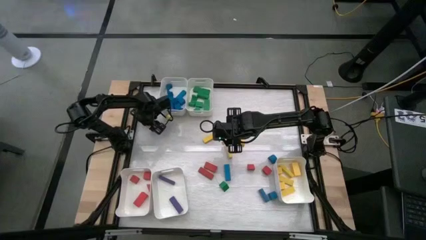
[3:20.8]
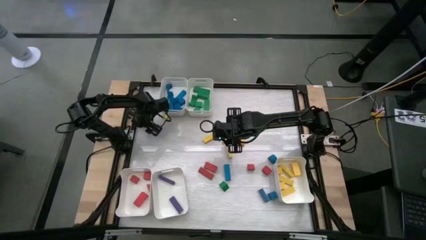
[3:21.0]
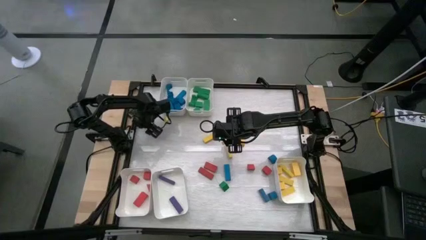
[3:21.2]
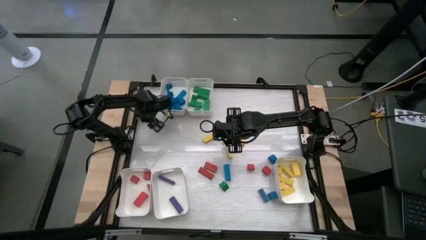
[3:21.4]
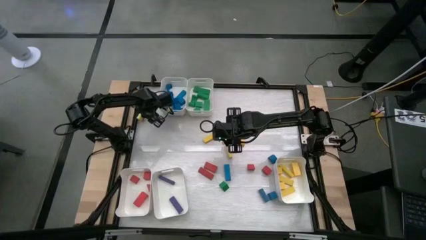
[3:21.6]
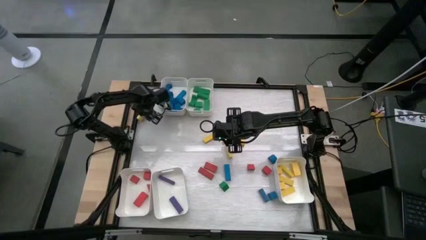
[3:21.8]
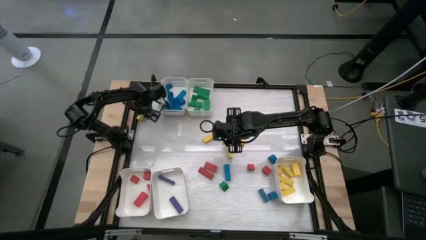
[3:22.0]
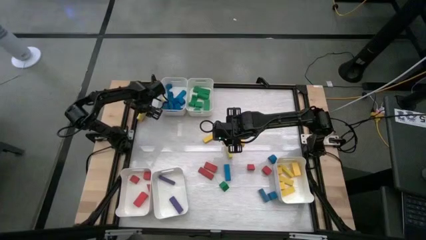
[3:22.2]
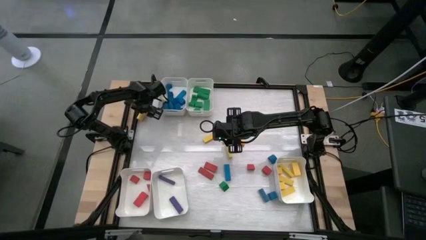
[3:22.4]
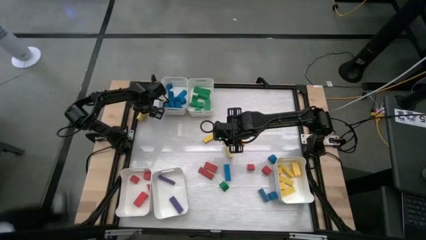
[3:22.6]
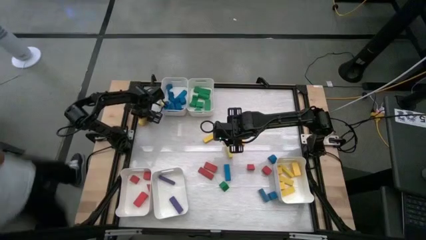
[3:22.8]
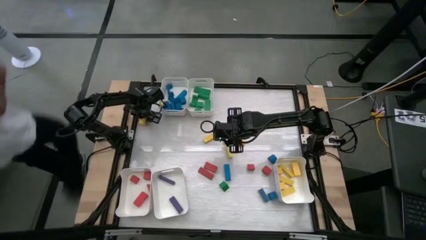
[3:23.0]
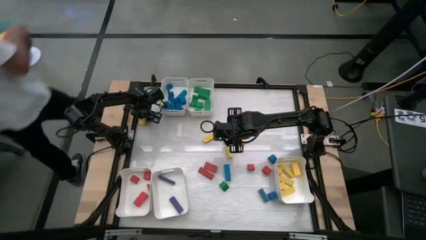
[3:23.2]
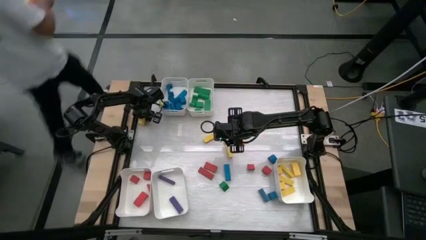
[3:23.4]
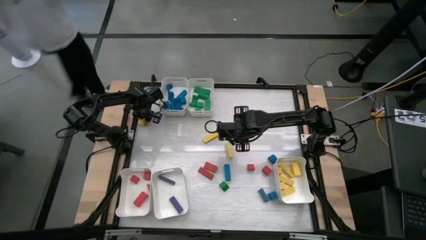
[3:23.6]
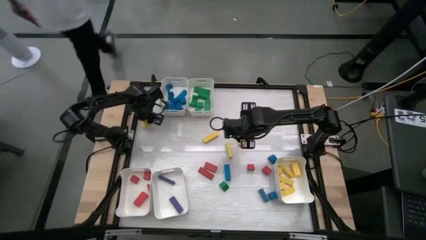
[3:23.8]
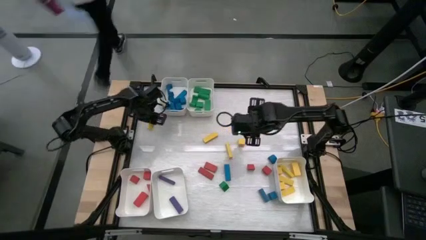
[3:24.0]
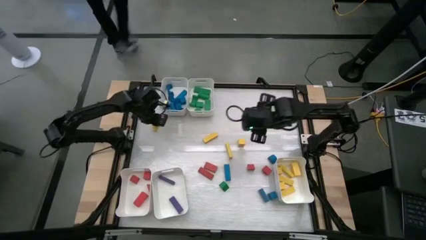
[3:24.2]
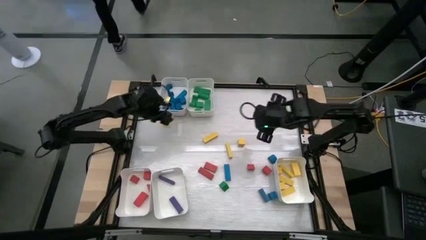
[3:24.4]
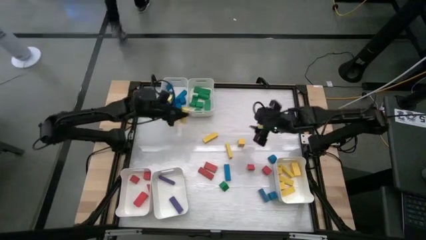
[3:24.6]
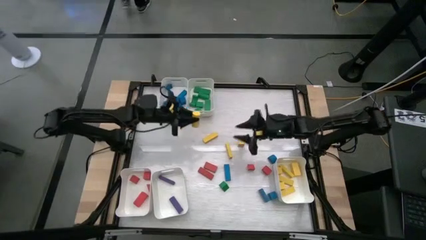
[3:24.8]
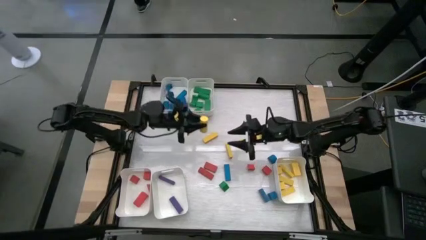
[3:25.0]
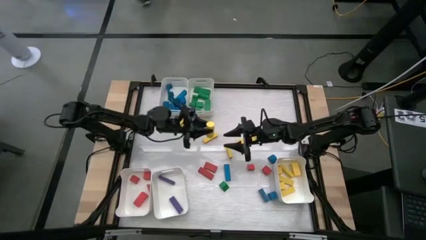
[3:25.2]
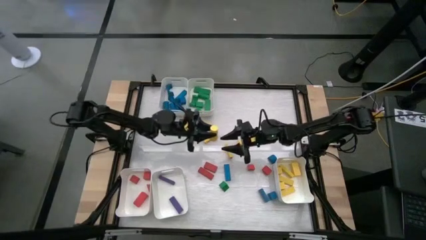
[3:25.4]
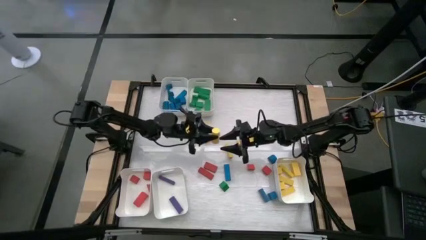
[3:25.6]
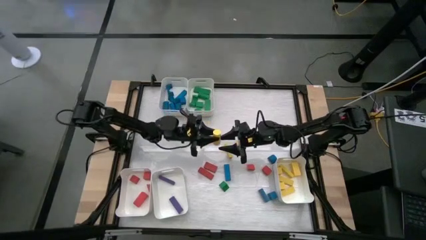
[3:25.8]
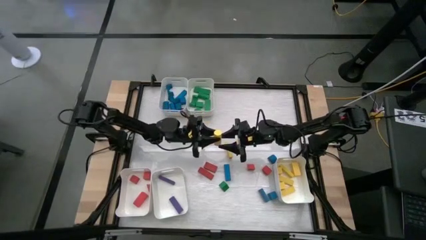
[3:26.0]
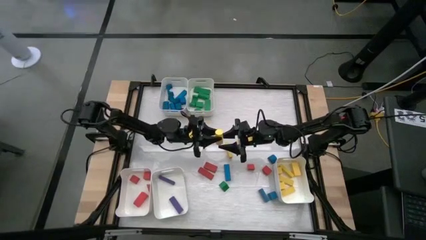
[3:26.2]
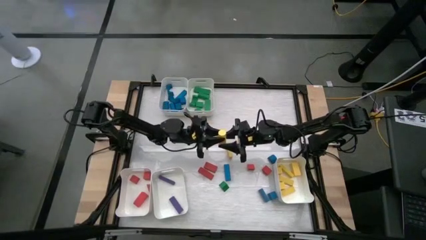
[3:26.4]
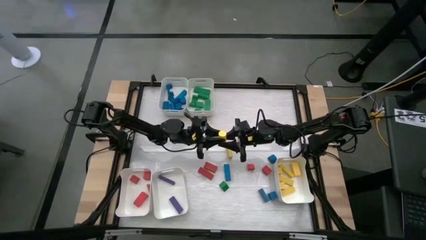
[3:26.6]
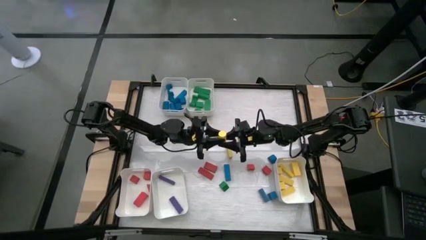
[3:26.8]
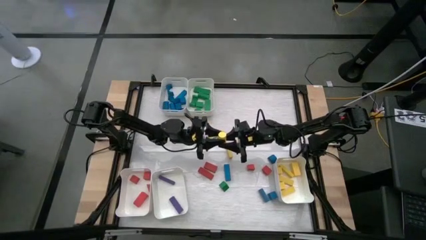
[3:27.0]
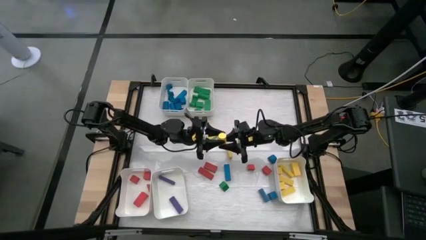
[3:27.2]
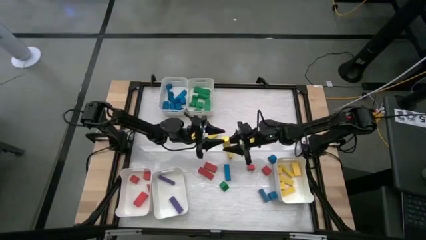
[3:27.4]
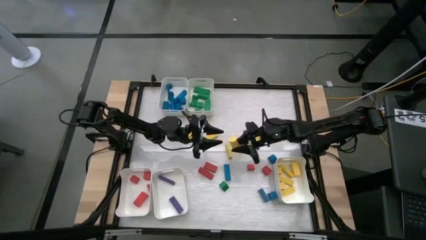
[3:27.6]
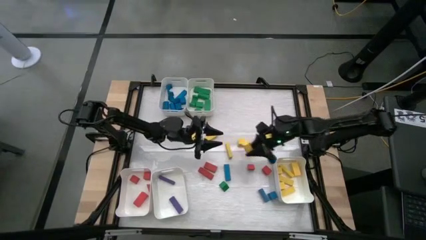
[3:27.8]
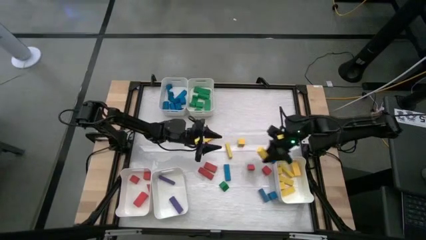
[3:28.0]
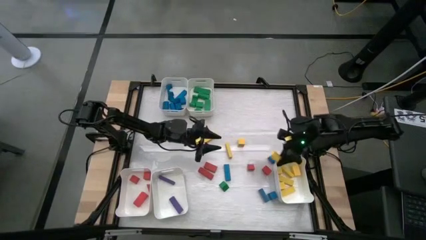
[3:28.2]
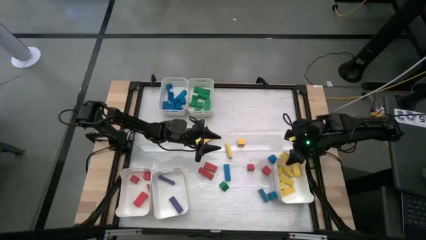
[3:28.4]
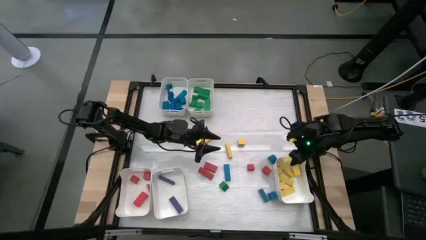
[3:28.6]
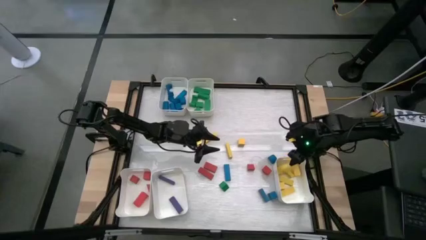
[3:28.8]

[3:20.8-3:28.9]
Task: Sort blocks
Put the yellow block into the bottom right white bin

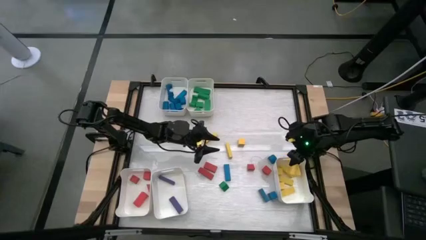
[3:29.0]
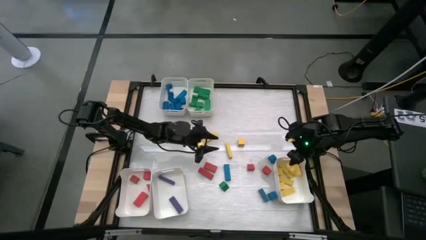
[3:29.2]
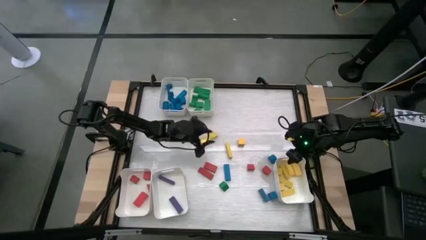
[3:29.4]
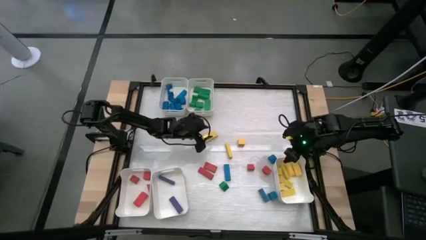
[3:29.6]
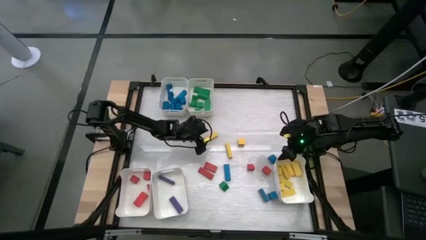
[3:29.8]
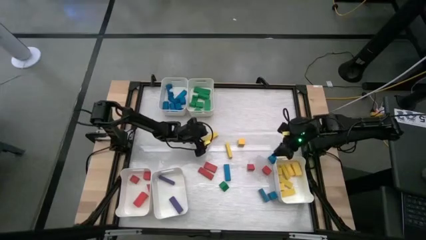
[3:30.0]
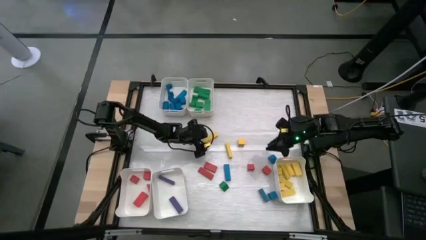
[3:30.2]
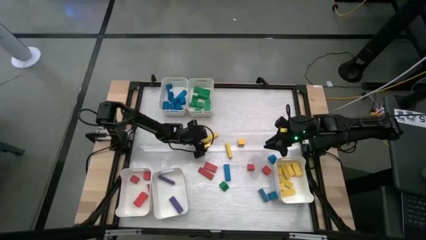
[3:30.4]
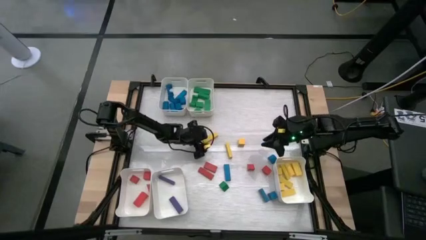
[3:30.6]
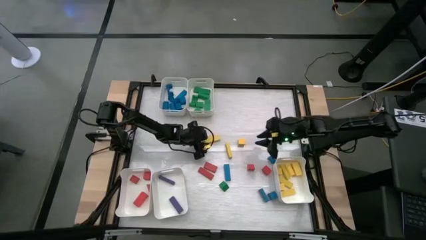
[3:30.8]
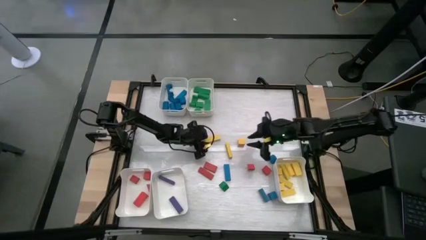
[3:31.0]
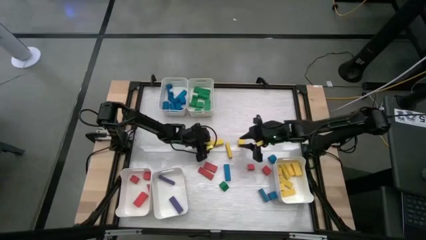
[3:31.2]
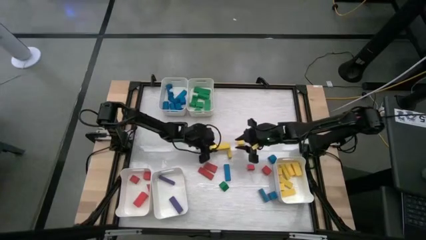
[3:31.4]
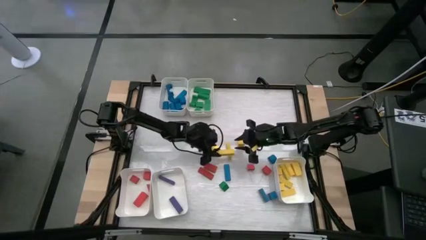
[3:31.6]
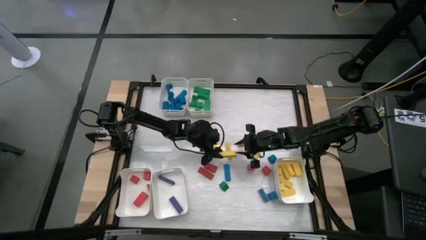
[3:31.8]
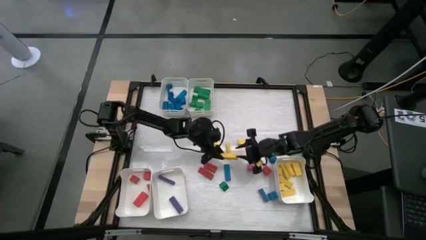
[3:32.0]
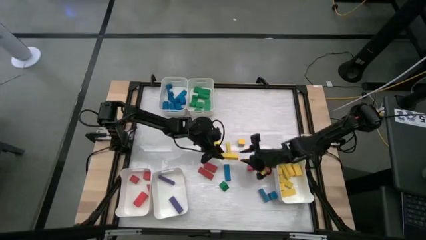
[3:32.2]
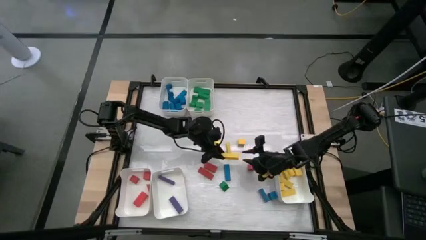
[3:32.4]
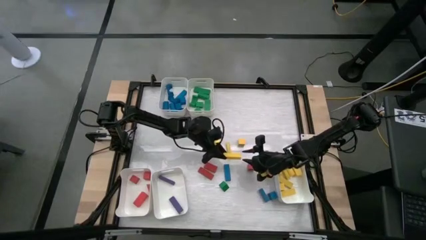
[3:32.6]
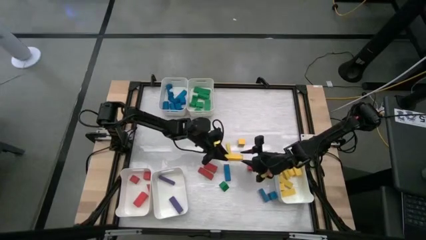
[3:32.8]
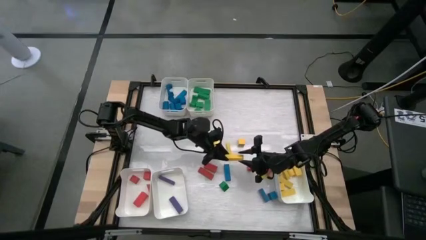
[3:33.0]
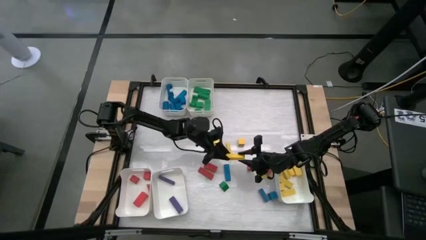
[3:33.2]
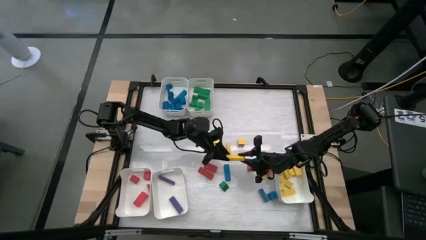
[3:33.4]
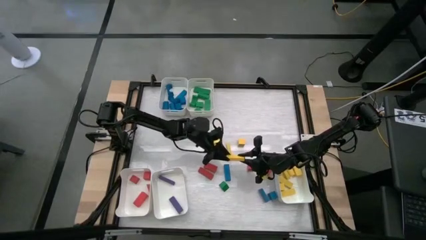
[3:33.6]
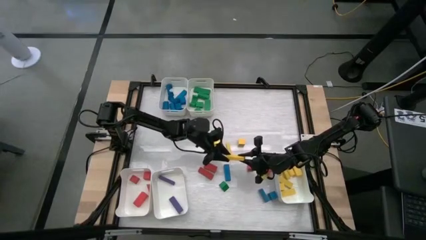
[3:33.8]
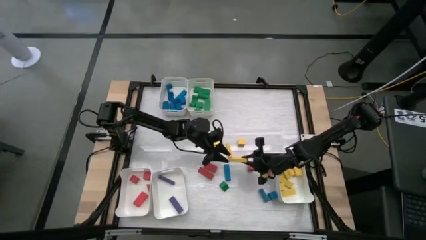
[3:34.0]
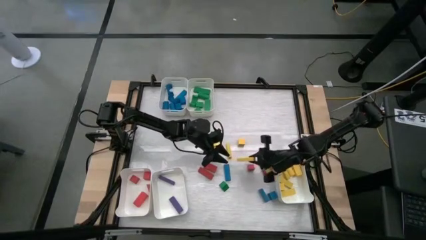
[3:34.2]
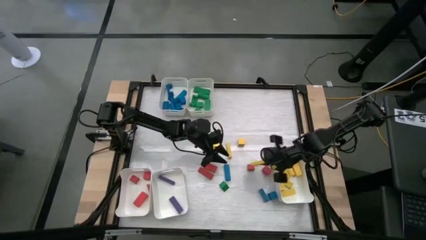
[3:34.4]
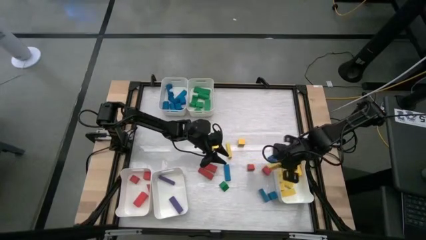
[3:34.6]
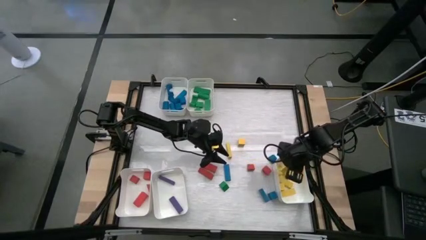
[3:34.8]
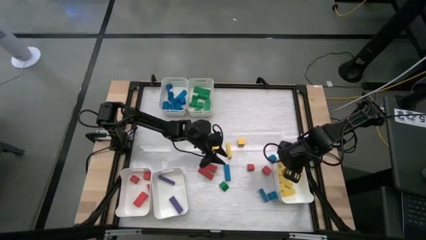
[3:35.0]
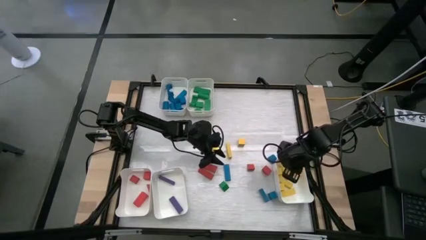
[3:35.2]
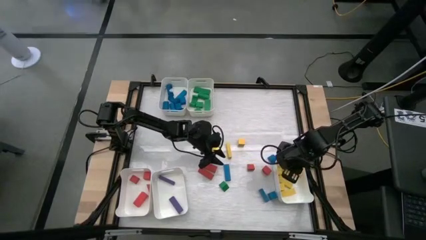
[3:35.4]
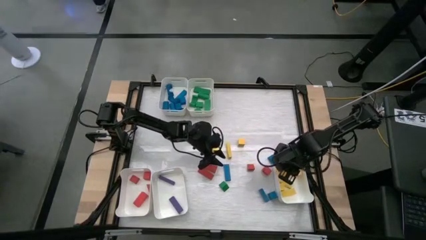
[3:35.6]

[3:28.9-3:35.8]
Put the yellow block into the bottom right white bin

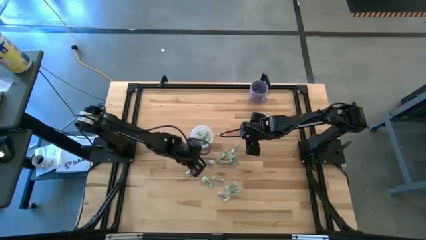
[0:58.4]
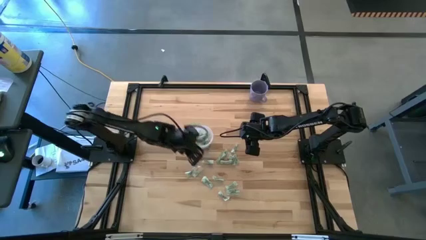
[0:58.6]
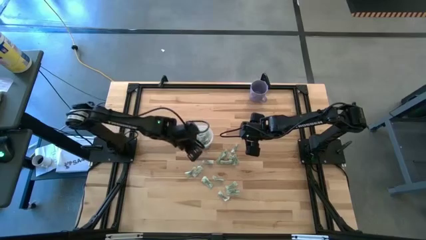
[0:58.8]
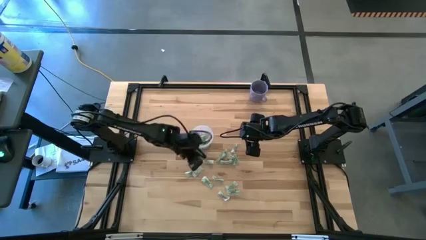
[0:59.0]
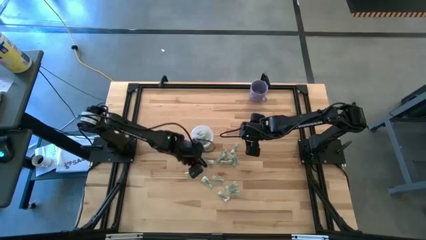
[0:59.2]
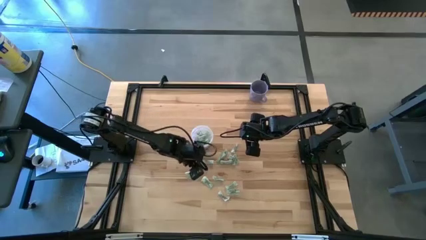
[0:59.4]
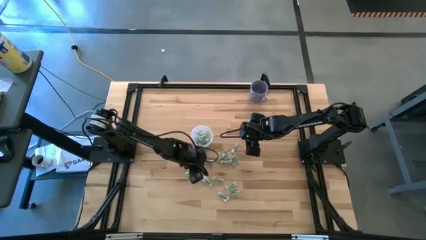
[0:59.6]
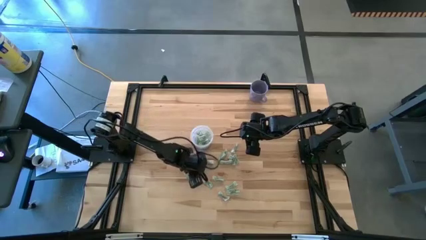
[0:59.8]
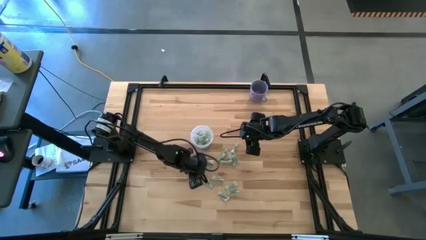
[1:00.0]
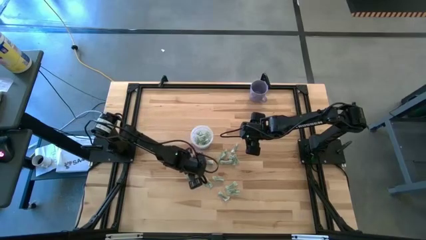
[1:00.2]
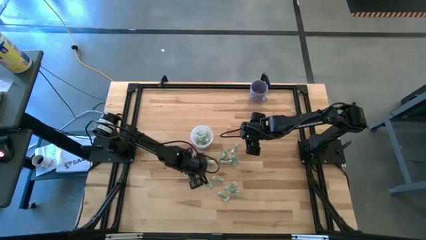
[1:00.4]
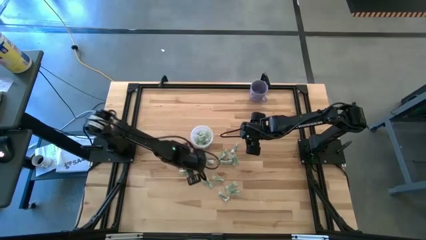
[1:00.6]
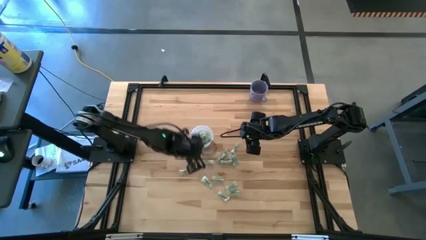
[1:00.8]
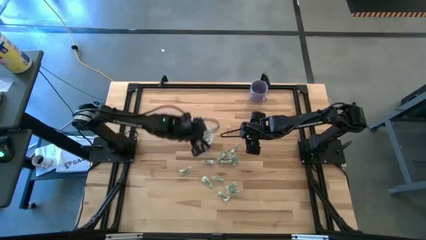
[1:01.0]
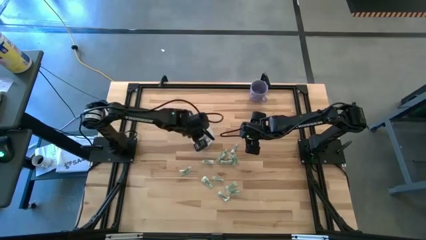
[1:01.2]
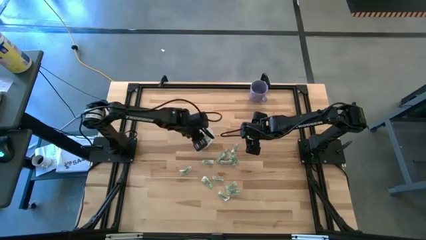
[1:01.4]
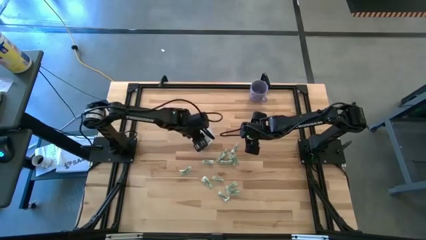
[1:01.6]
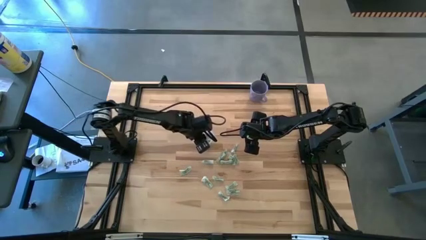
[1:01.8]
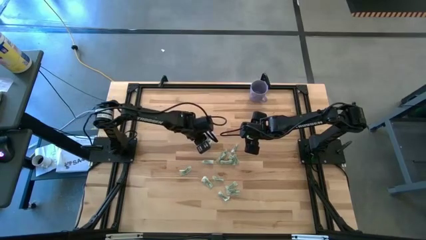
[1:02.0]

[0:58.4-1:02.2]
Task: Pick and place Stevia / Truvia into bins
Put the white stevia packet into the transparent container
